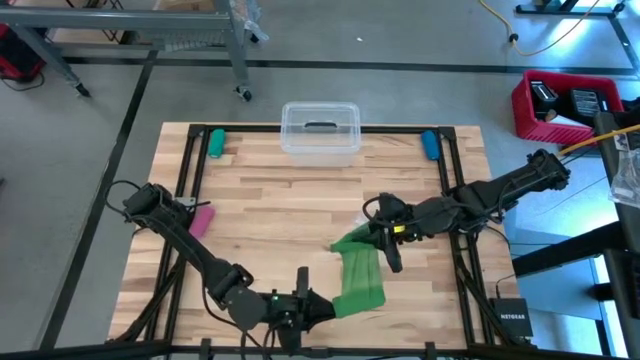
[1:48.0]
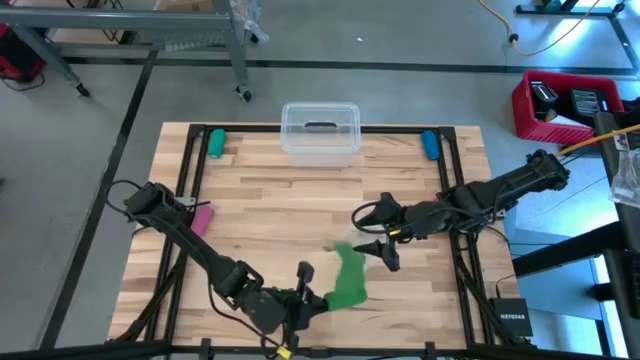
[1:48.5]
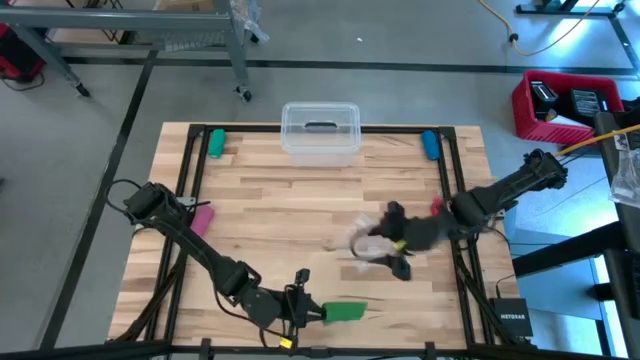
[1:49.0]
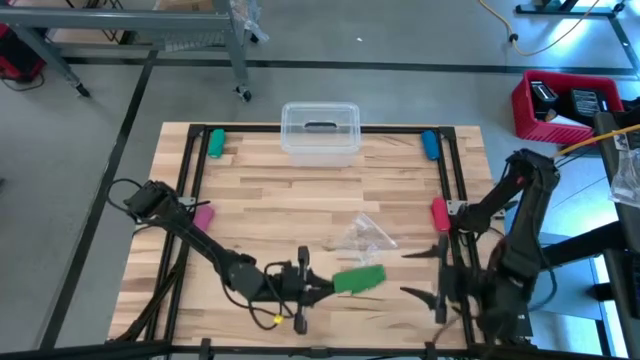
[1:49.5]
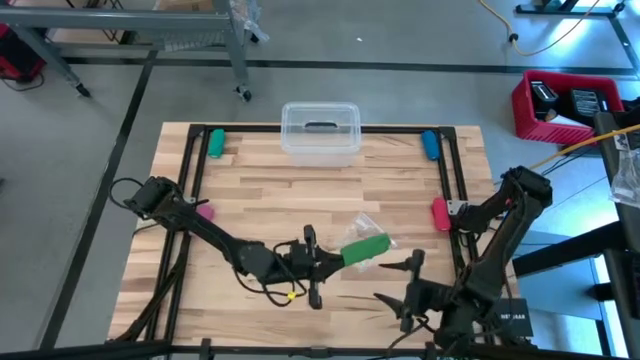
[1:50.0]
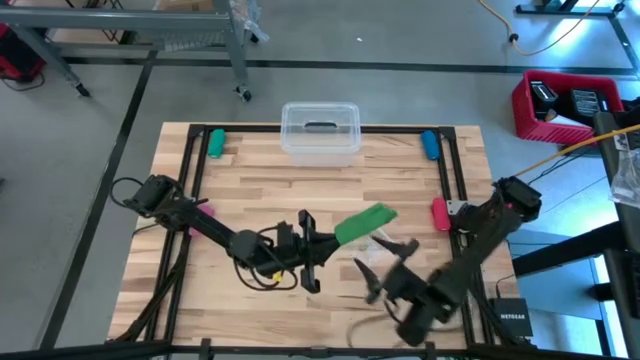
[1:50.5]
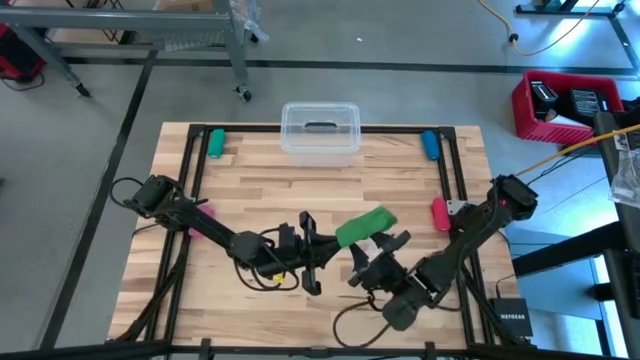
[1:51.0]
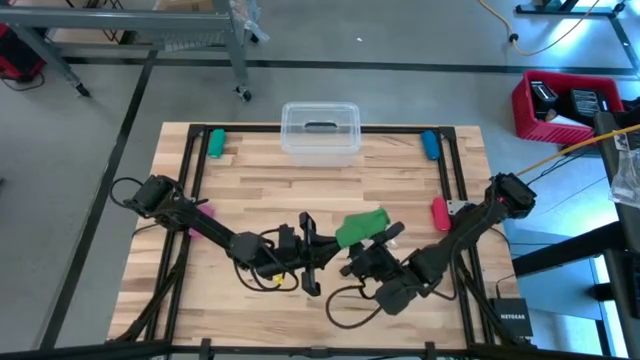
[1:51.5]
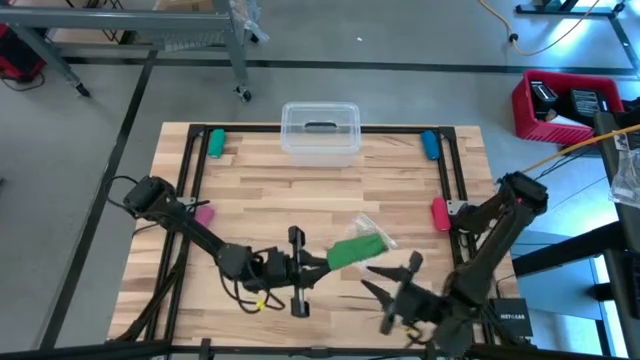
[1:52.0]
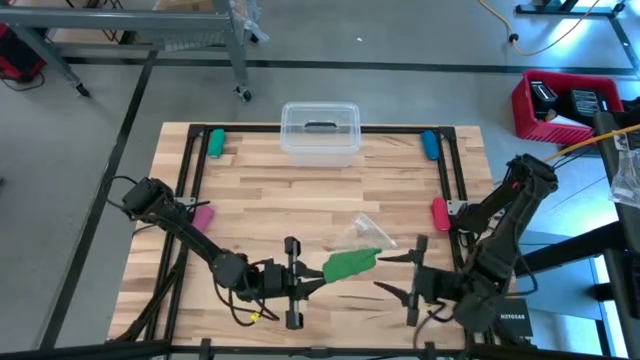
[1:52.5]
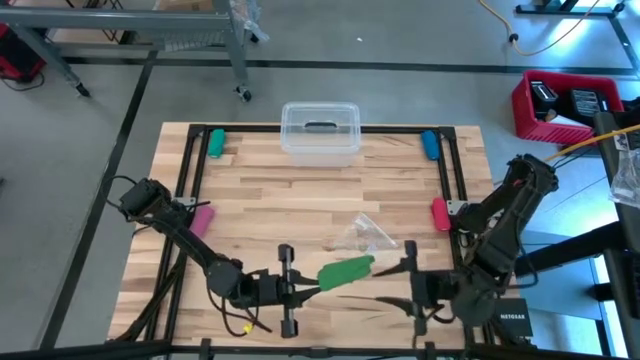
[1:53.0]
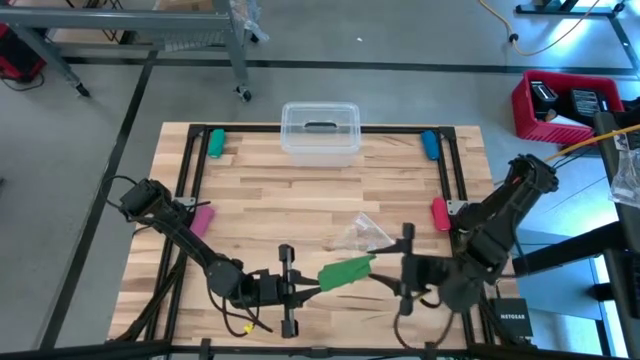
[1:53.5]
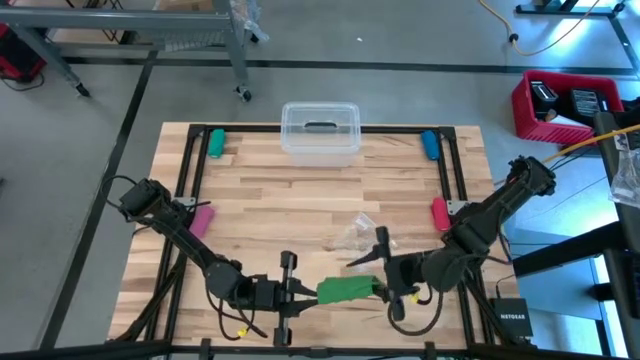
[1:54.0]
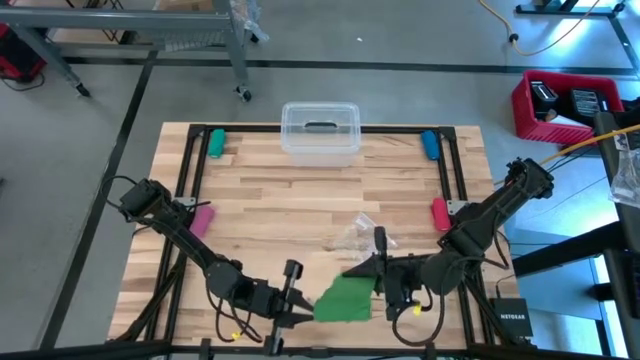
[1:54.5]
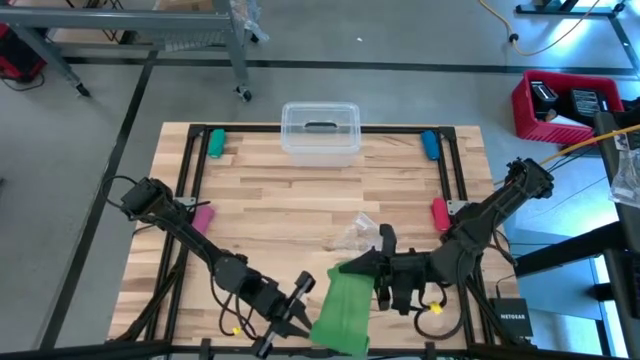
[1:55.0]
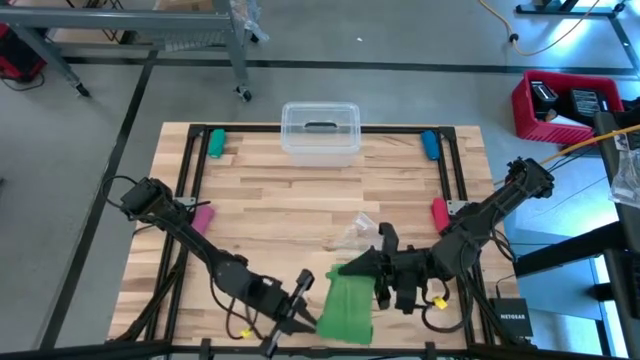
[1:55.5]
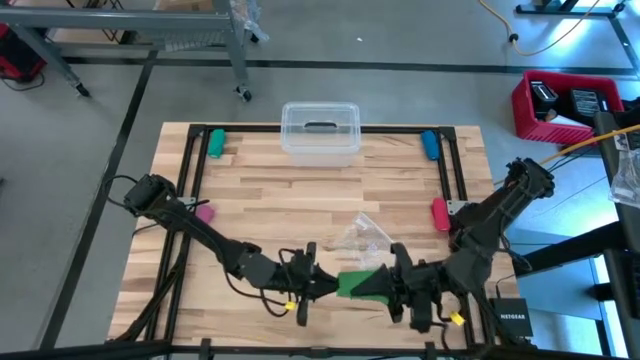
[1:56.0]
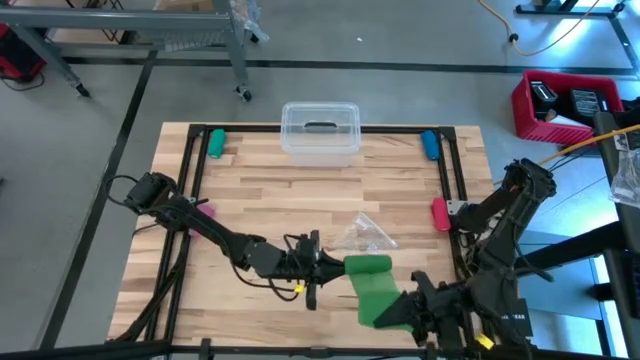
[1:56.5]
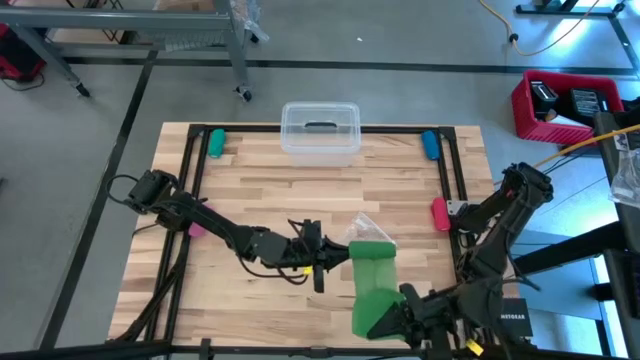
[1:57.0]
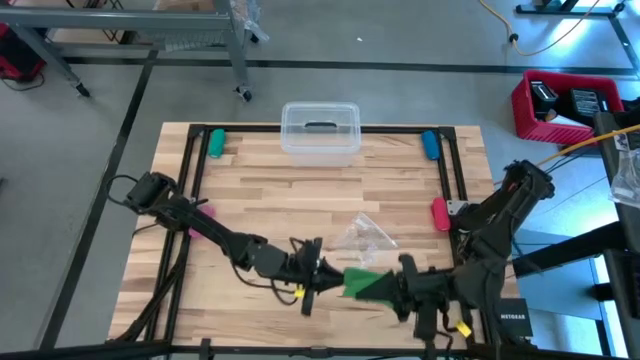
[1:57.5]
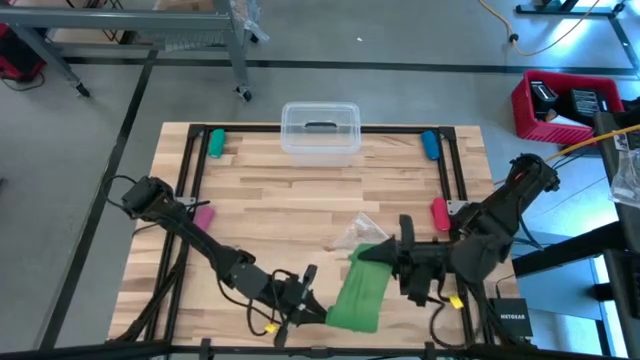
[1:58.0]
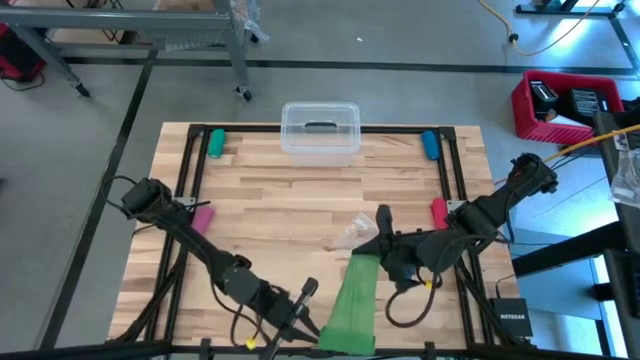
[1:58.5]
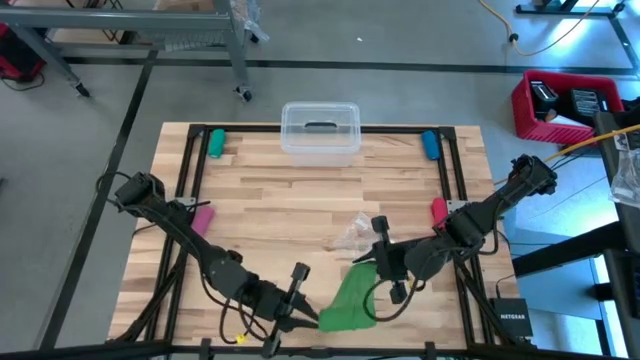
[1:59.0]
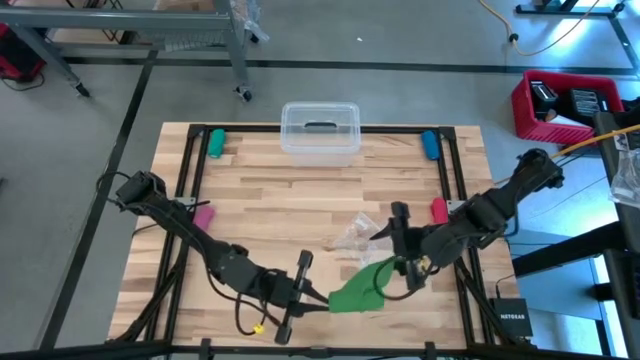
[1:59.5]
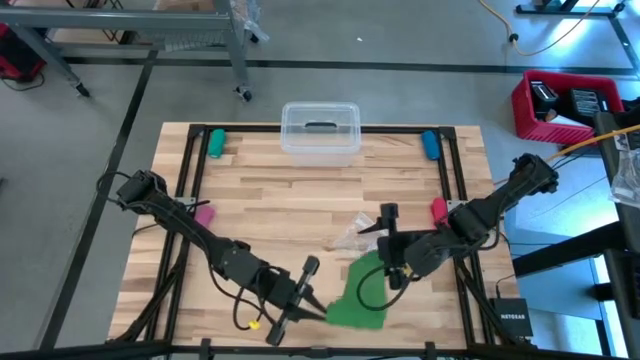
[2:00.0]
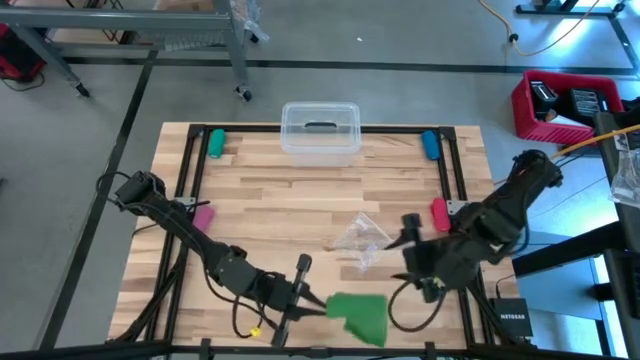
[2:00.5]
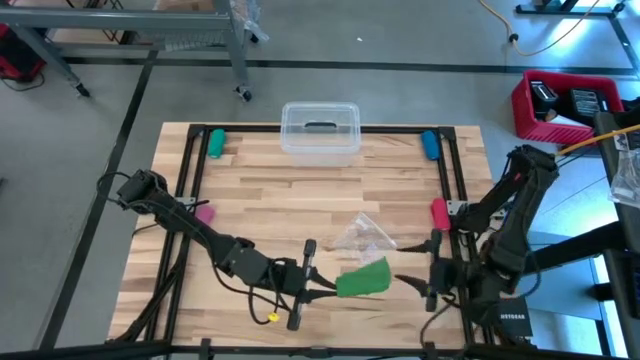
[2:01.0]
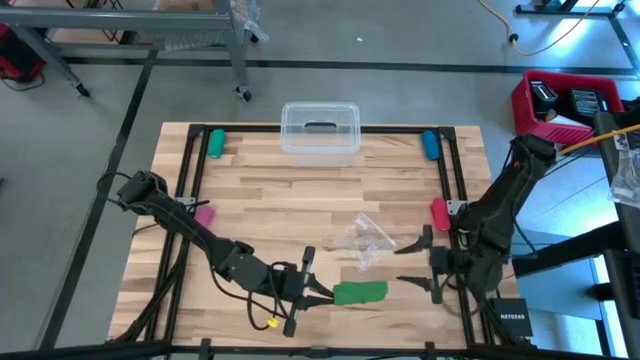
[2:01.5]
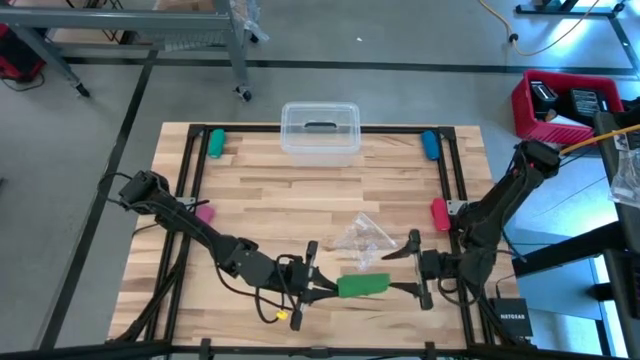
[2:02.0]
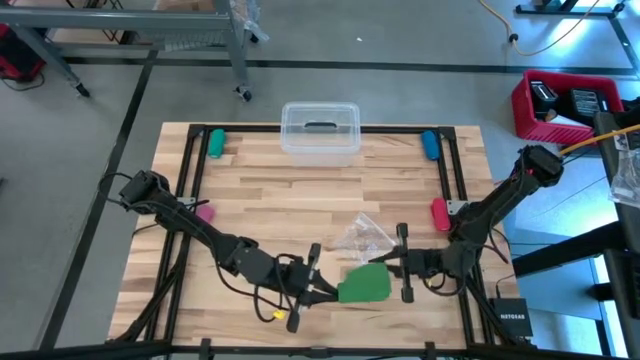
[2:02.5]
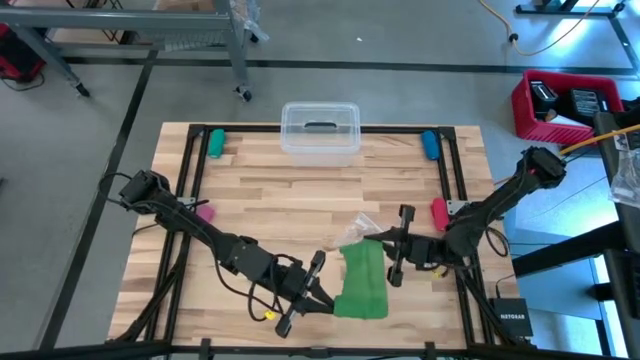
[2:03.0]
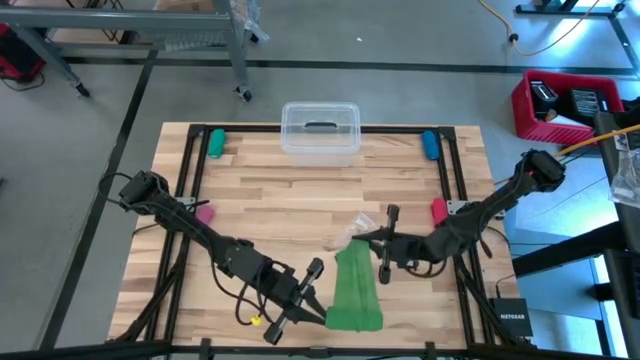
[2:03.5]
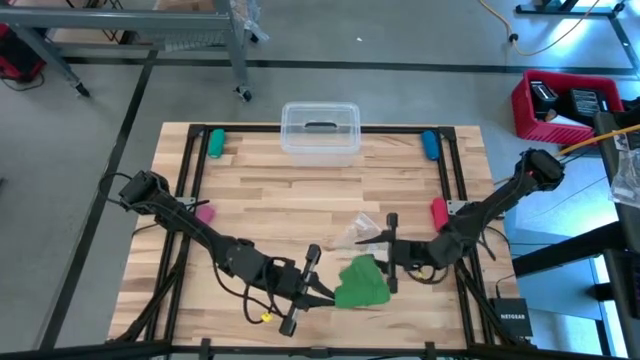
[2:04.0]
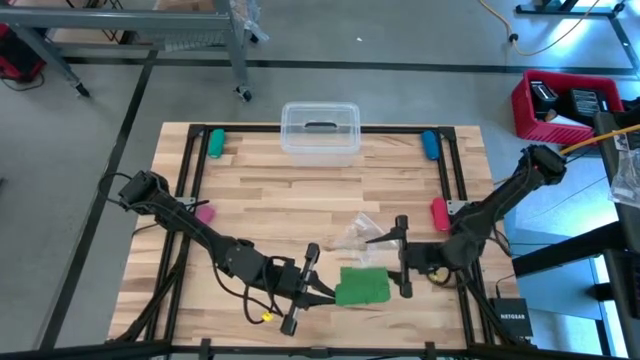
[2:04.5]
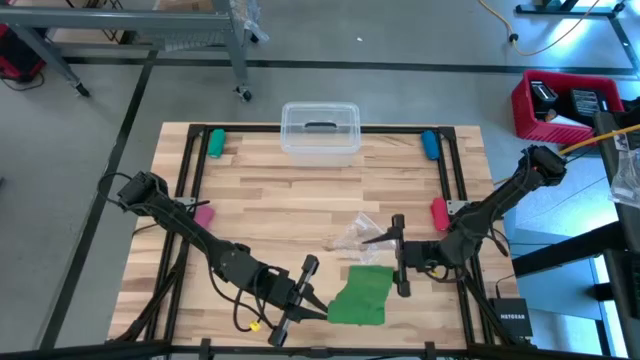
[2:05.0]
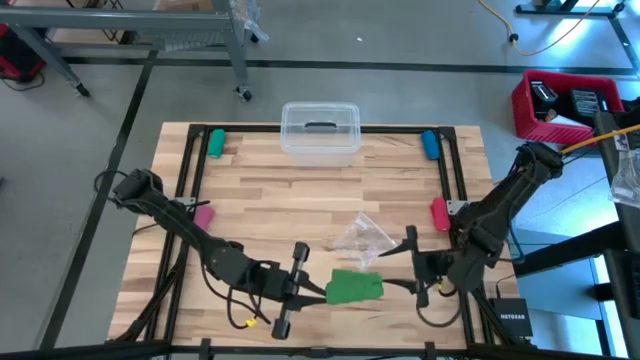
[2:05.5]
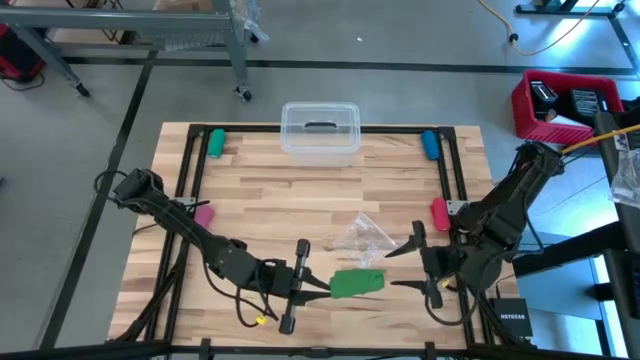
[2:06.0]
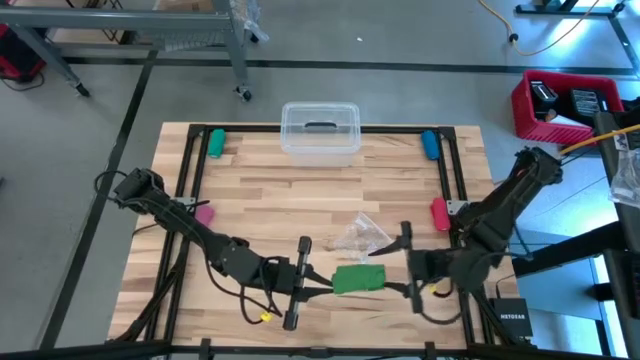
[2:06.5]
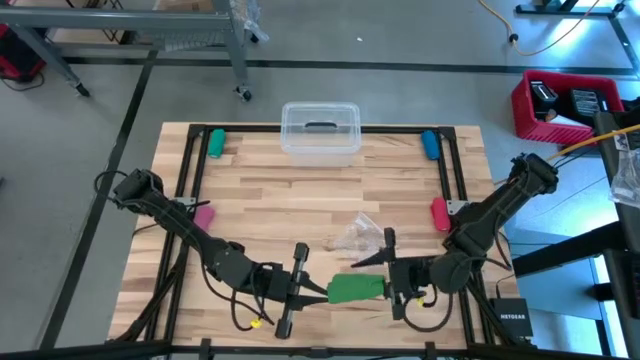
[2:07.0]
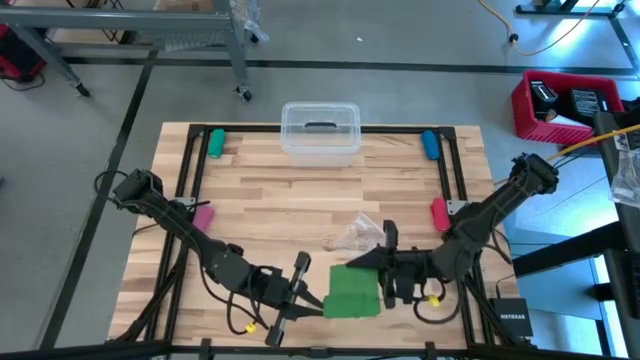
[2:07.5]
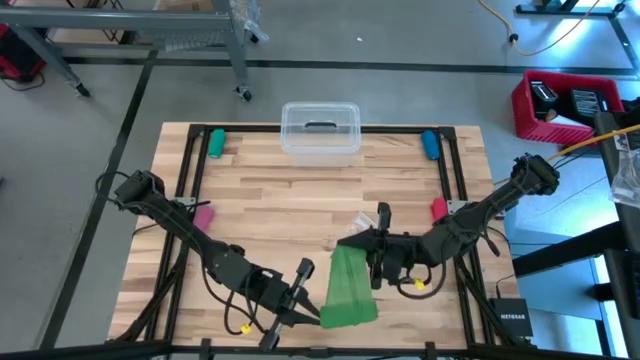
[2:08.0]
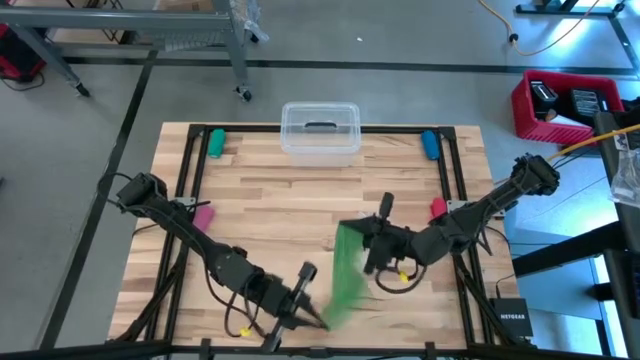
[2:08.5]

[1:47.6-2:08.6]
Task: Roll bandage
Roll the green bandage
